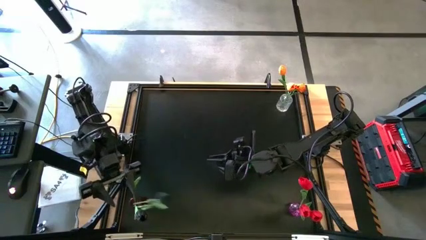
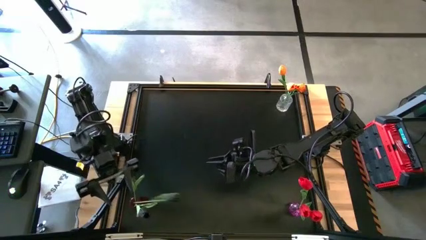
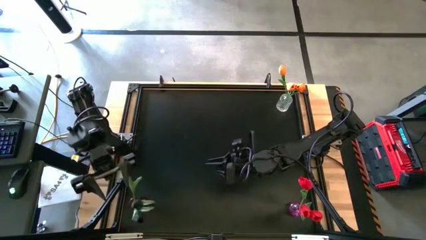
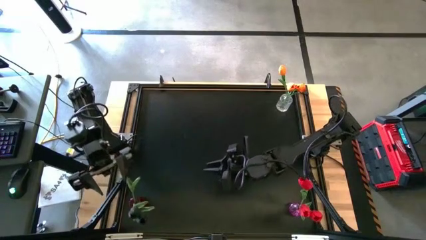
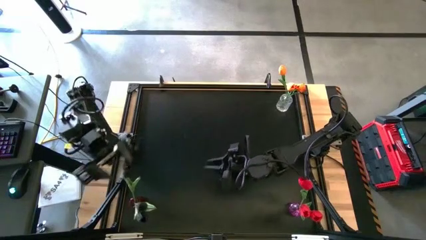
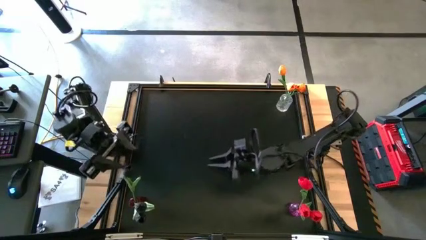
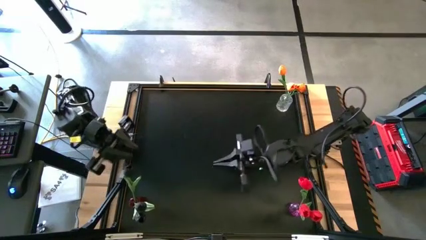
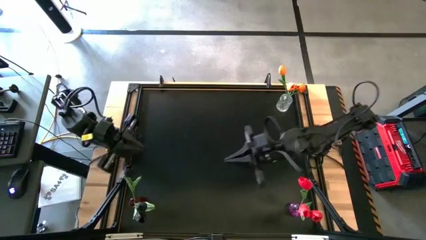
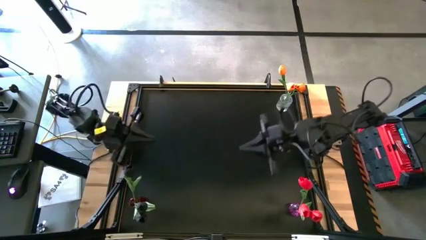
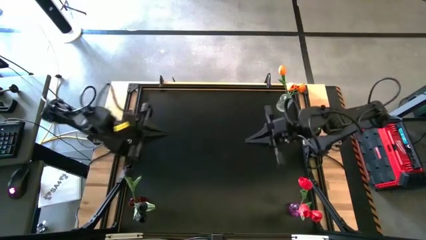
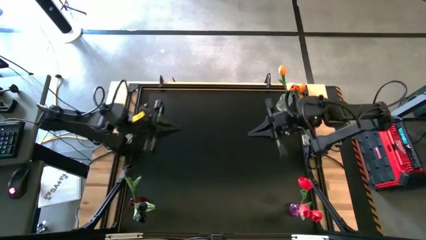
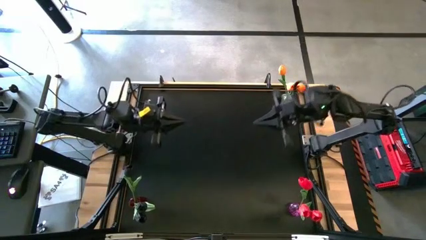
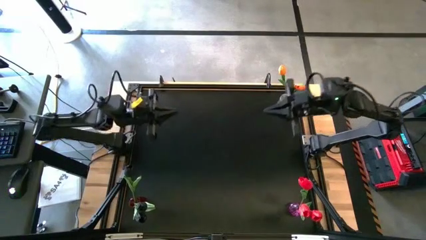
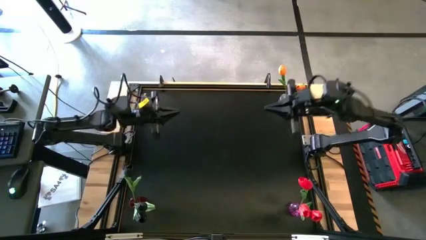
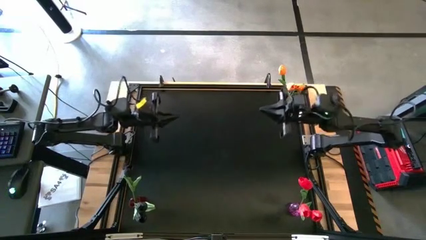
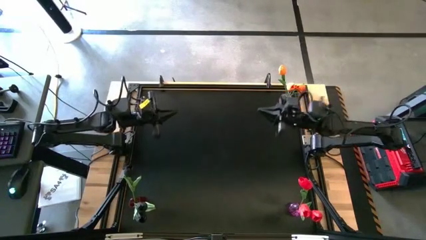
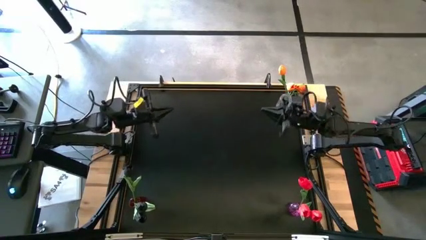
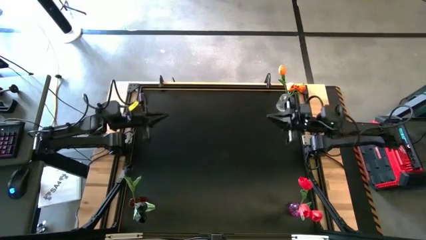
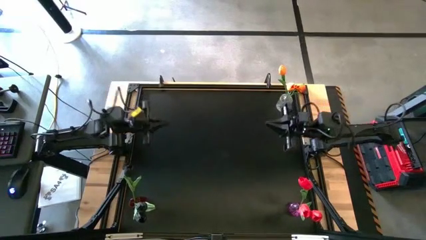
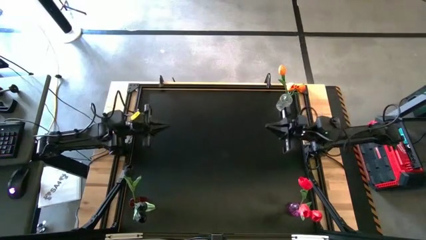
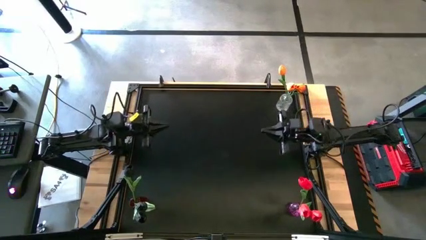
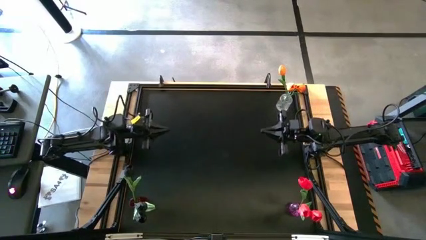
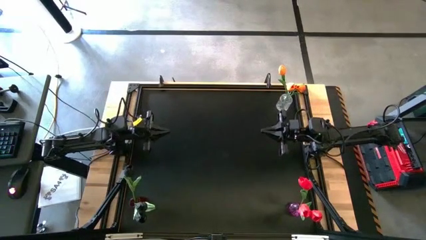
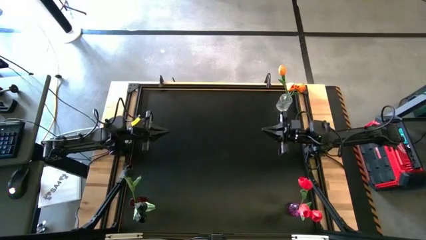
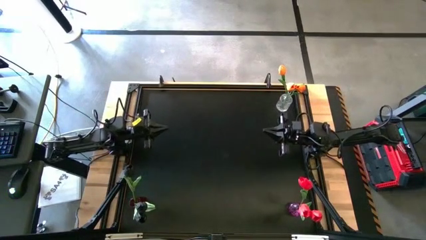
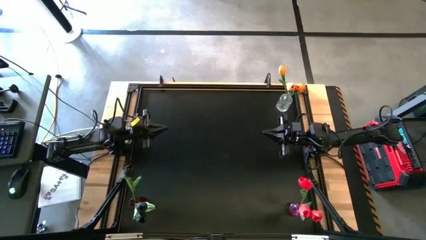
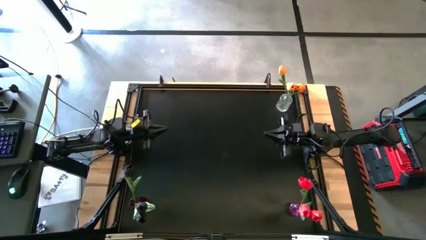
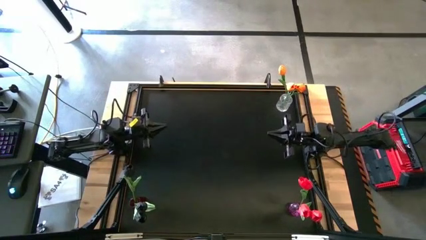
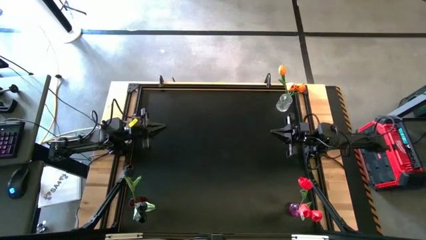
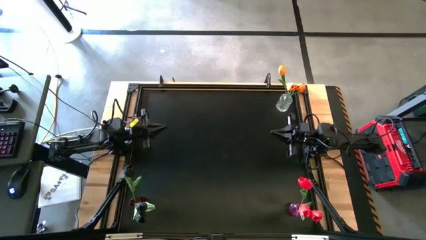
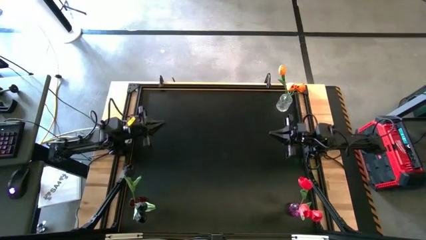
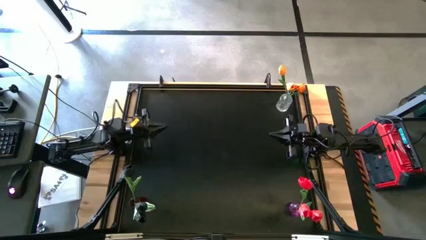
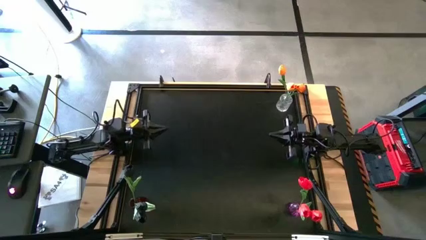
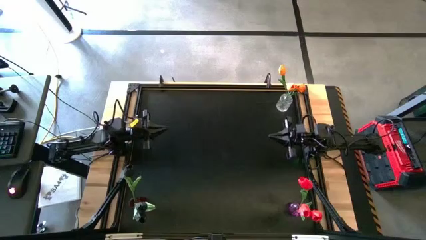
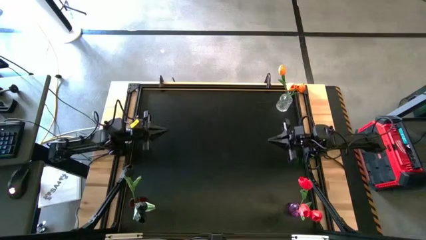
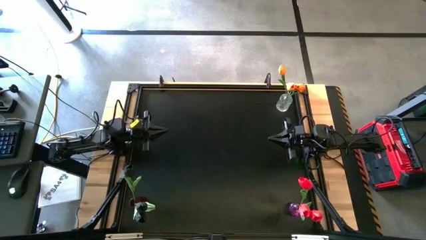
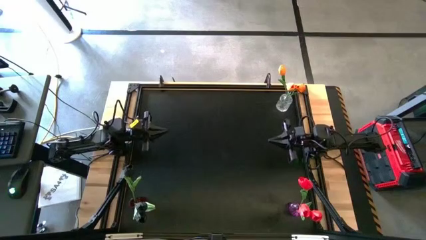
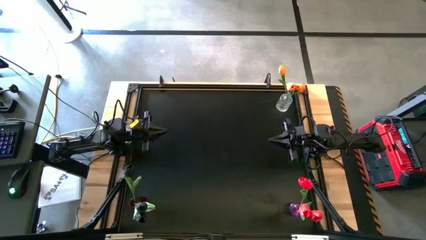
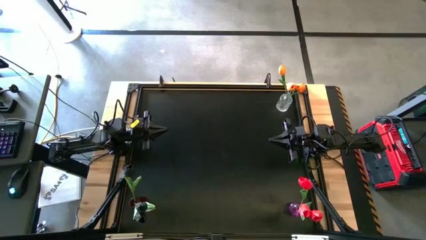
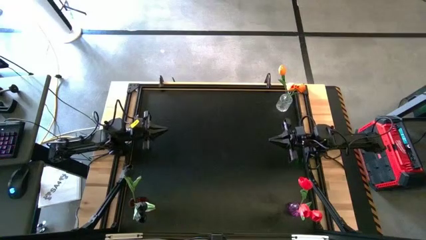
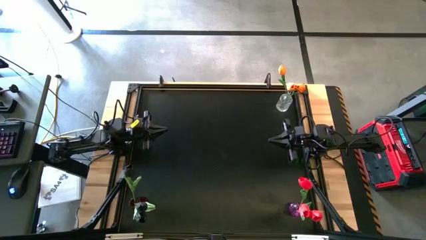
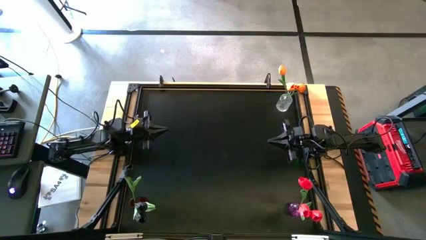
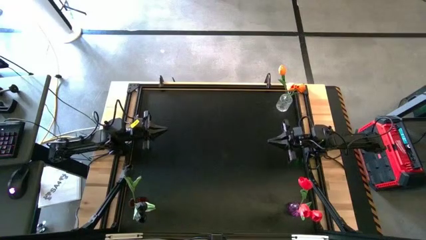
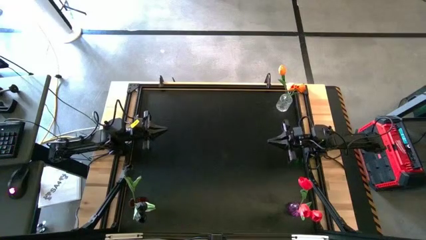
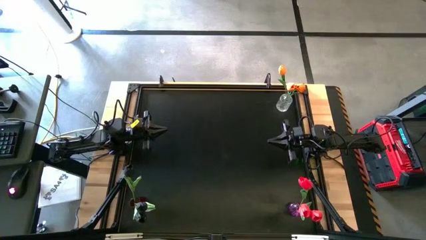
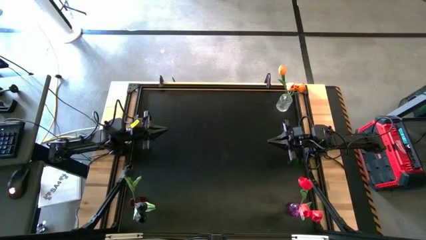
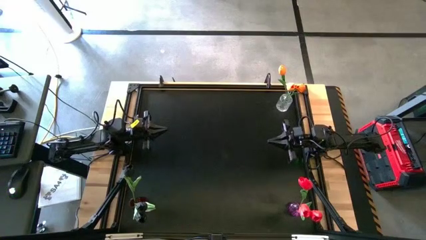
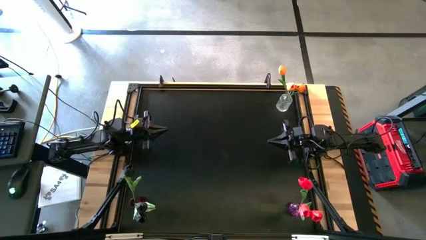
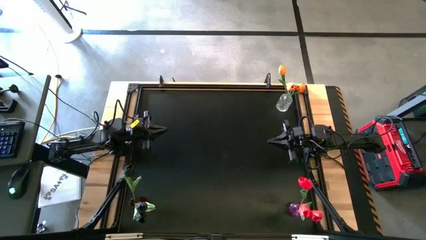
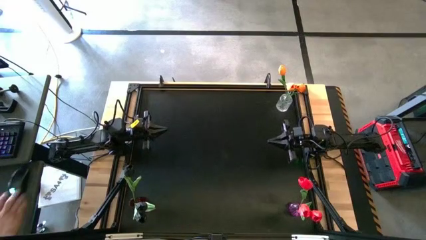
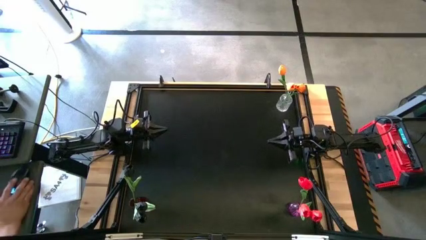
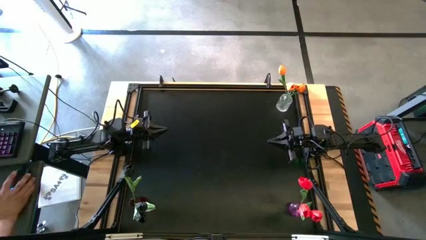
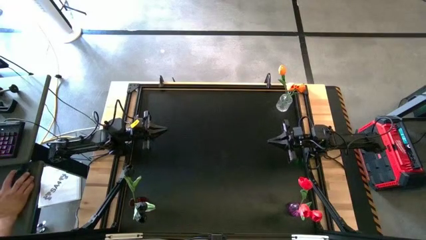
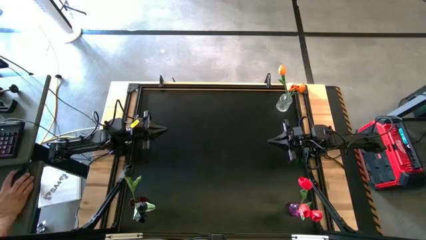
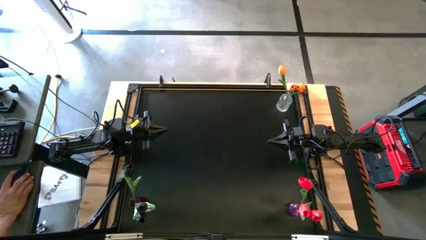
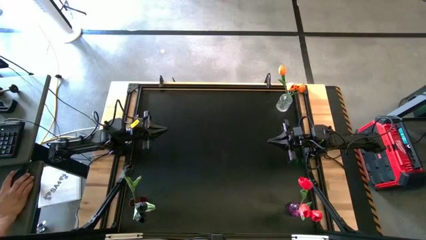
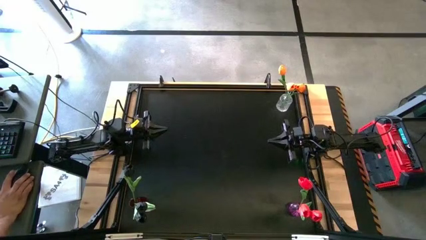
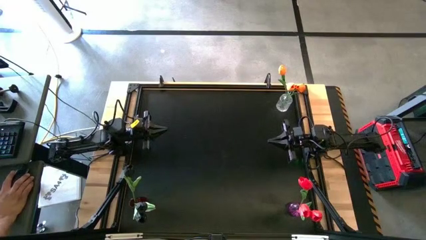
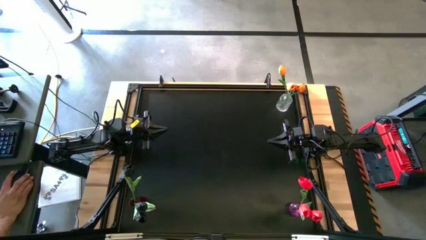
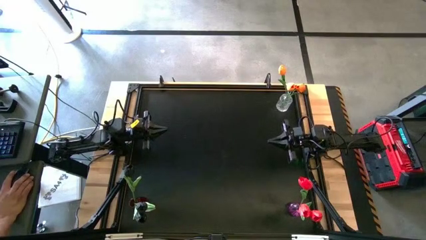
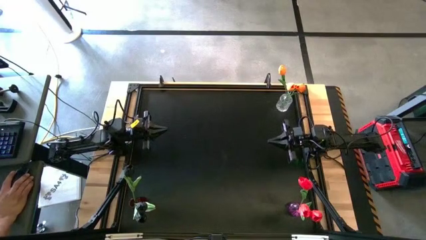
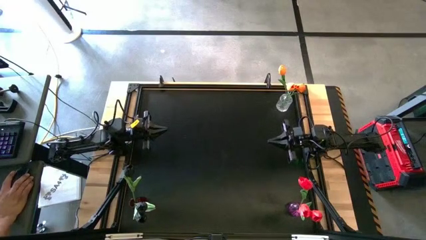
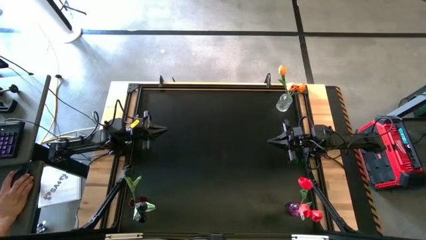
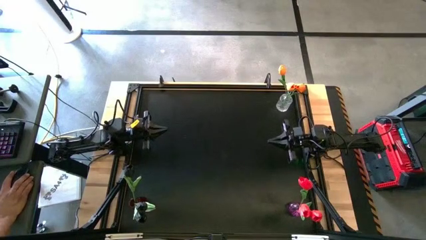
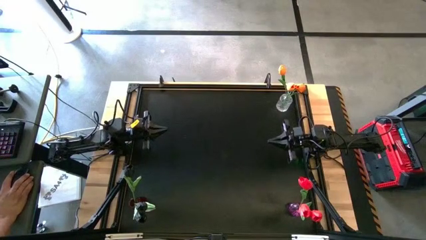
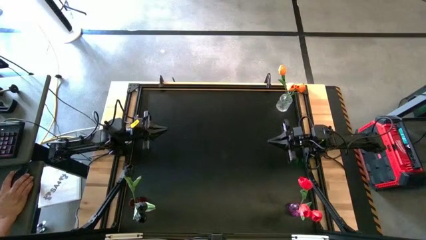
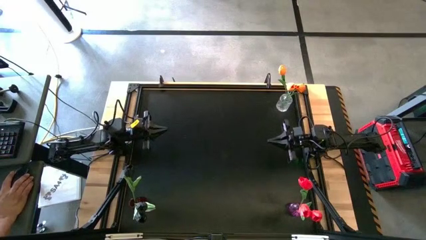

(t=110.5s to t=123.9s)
Task: Sort flowers into vase by color
Return to Home Position

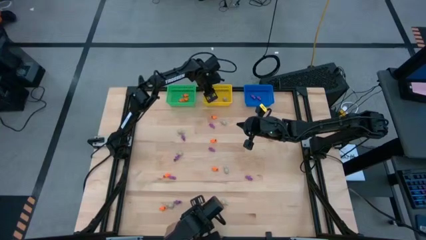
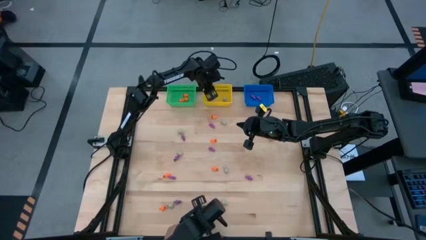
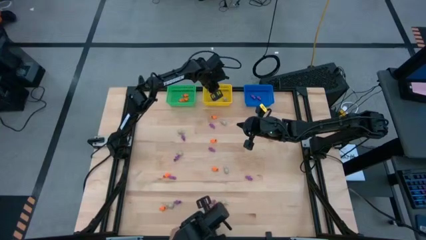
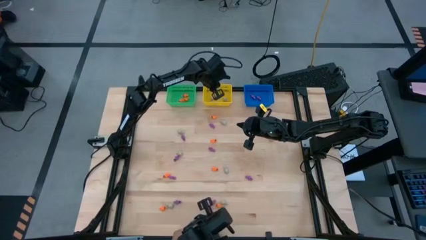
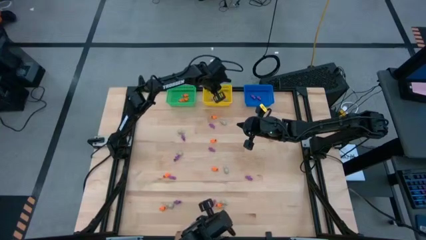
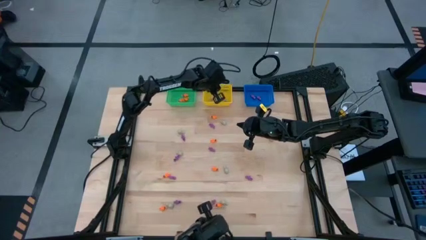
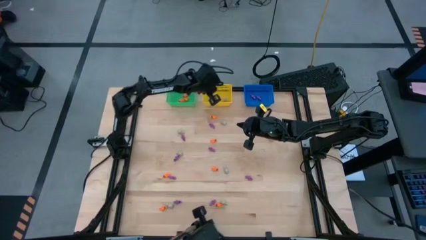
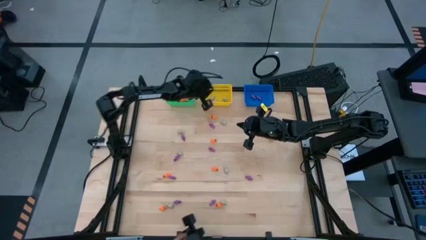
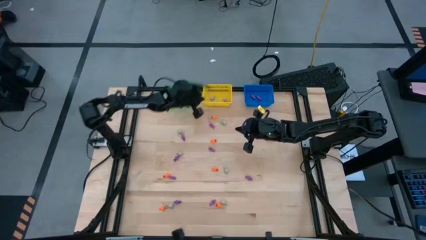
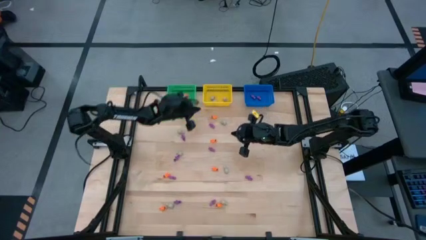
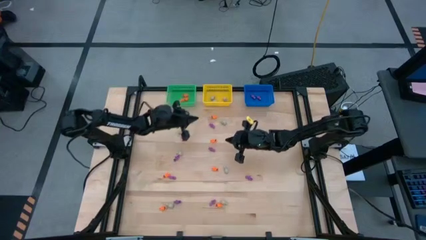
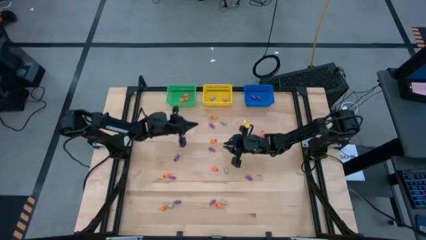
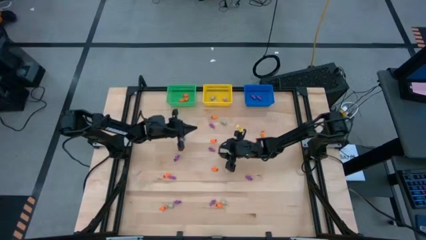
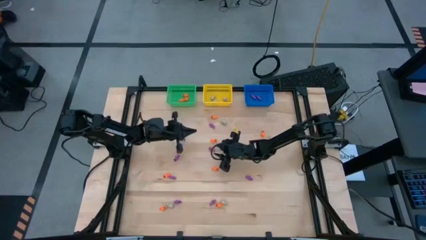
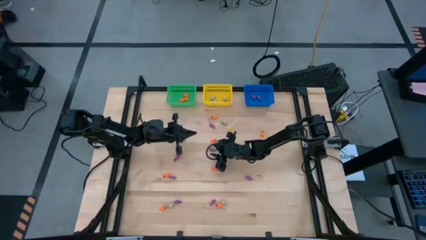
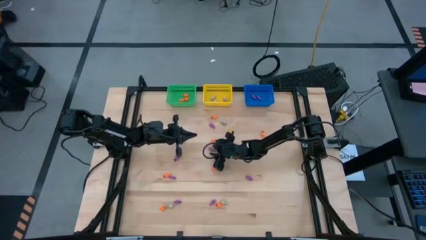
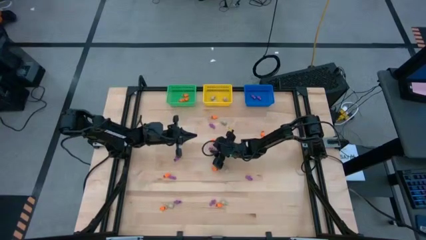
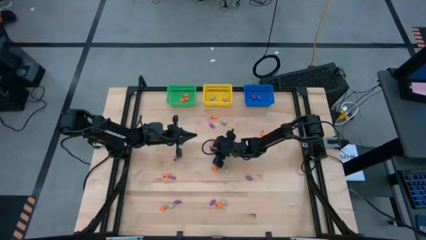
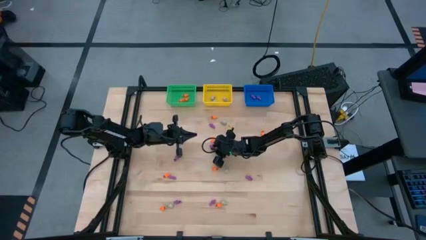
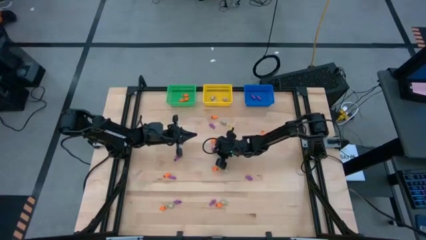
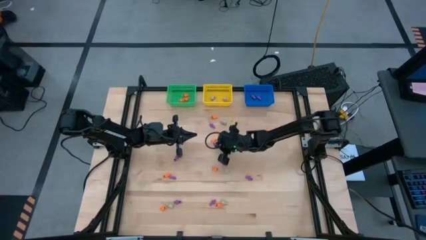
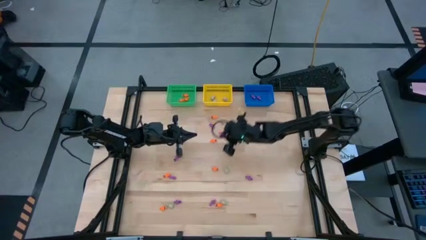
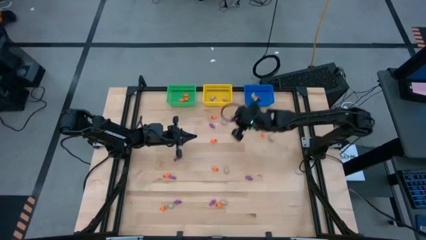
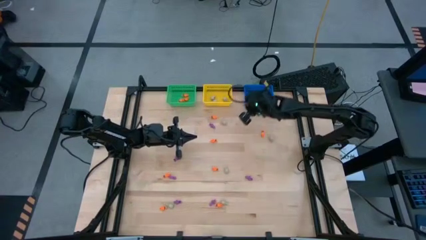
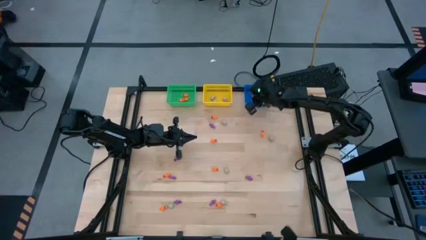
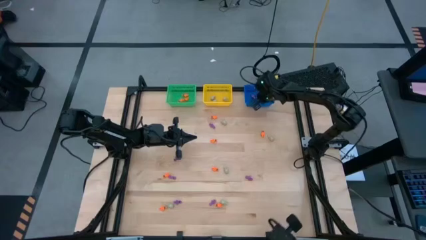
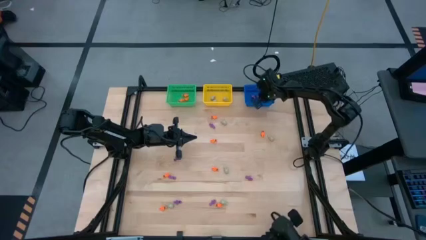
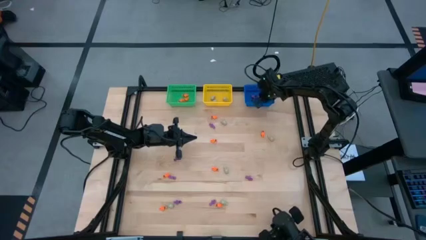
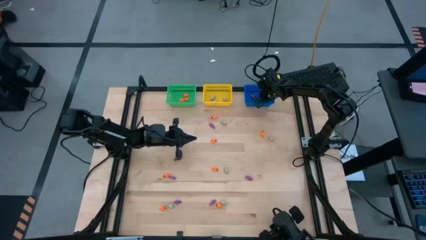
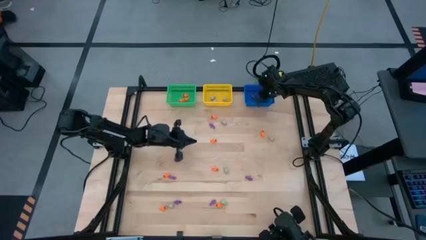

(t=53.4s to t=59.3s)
Task: Sort Halloween decoration
Put the violet skeleton toy into the blue bin
